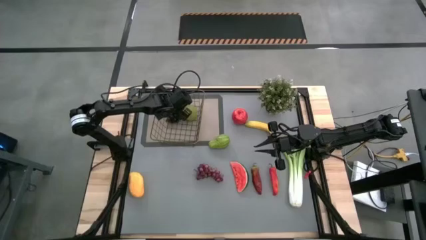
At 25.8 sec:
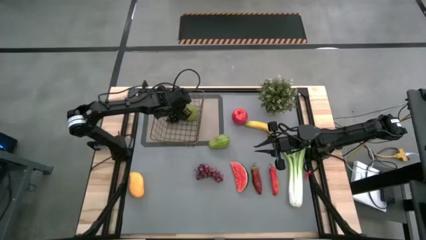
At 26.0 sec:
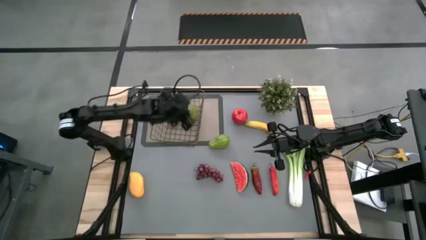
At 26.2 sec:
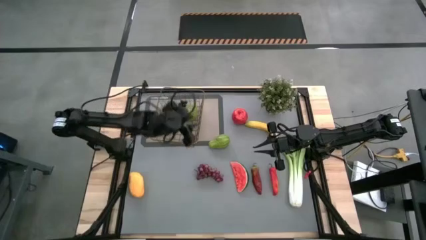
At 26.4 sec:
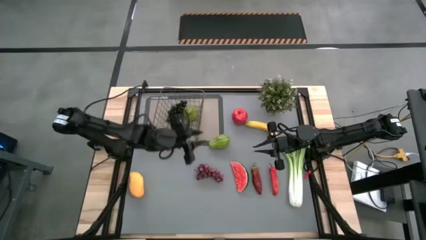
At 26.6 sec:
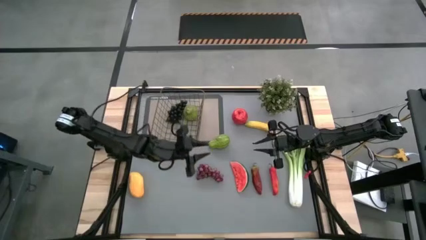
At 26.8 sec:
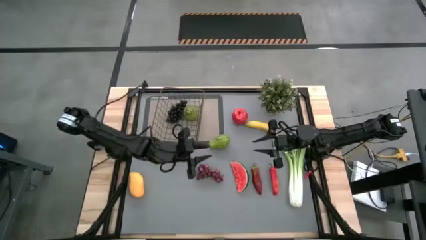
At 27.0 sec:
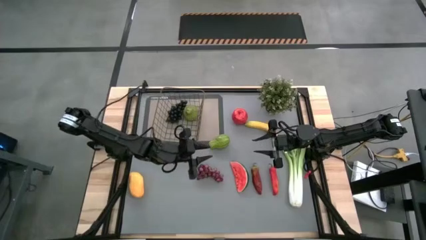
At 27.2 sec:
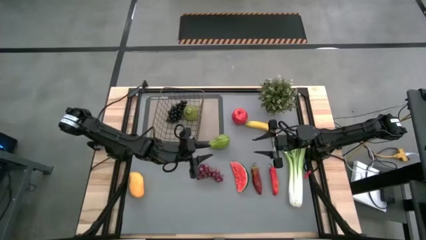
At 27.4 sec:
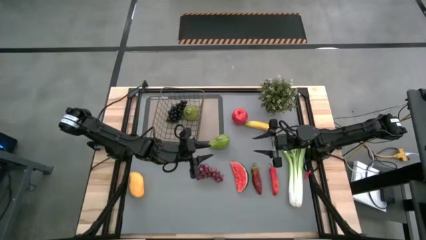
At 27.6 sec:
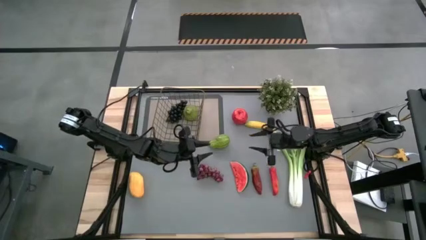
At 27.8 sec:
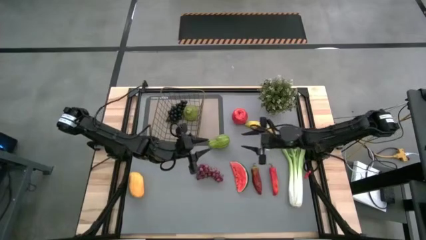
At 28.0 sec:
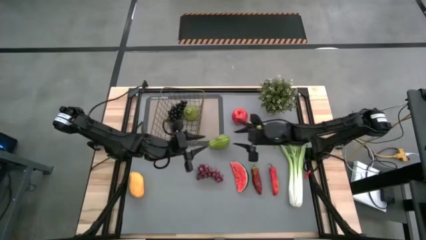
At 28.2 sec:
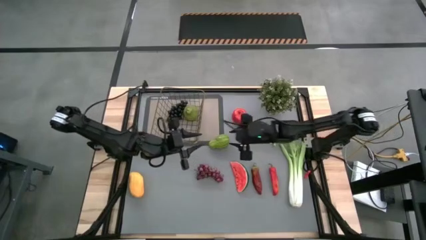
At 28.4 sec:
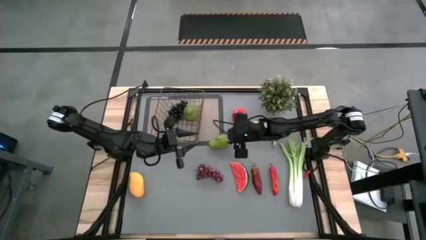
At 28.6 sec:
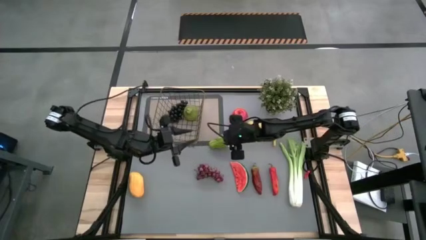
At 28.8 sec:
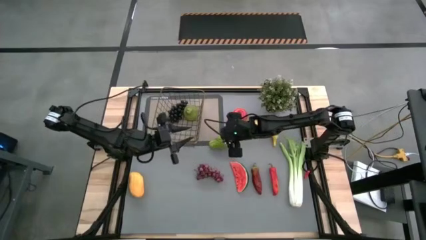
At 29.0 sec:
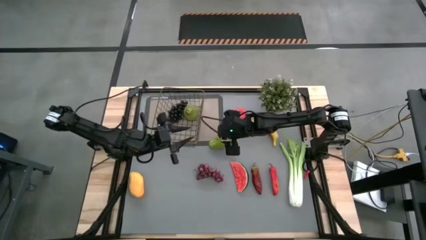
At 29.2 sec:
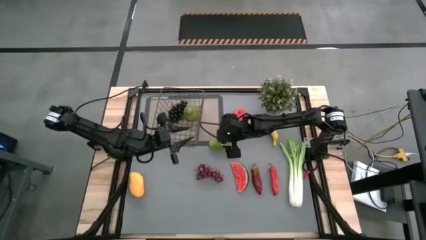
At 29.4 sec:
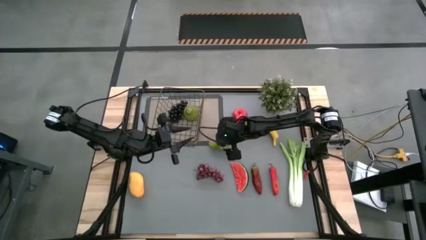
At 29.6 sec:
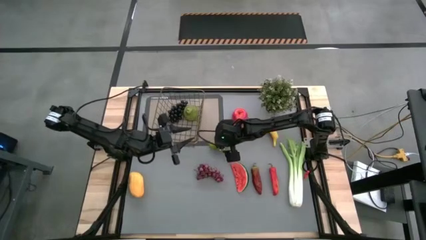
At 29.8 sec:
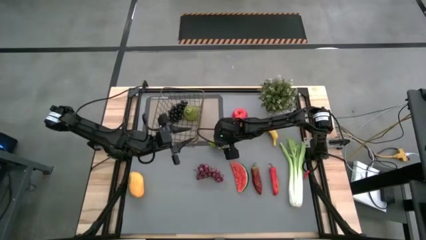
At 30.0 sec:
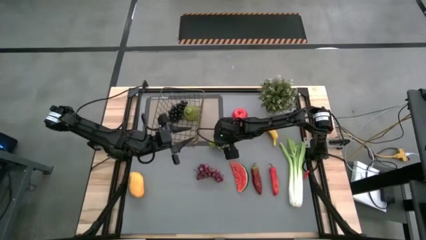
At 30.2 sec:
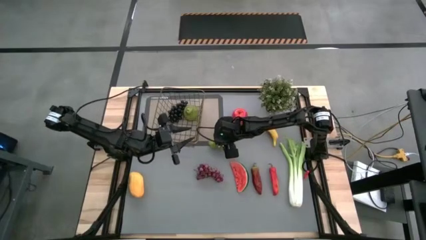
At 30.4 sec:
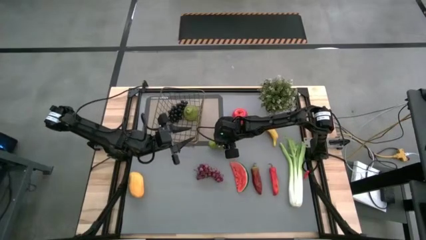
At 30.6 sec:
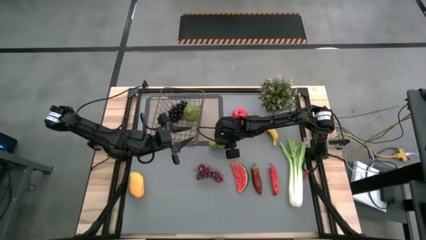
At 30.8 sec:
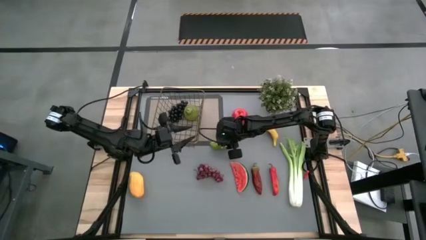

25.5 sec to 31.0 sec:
Task: Build produce basket
Put the chayote into the wire basket

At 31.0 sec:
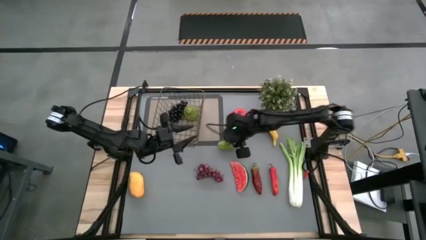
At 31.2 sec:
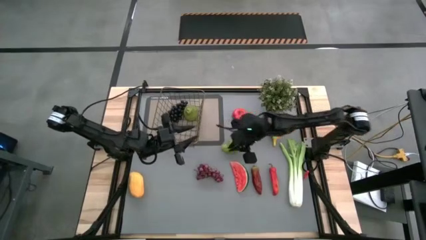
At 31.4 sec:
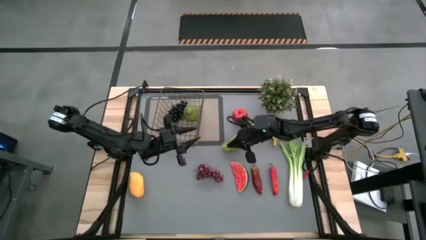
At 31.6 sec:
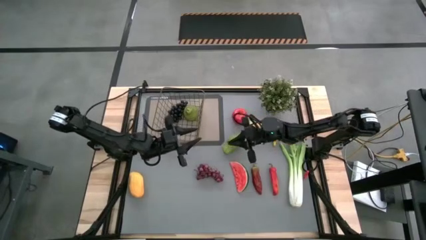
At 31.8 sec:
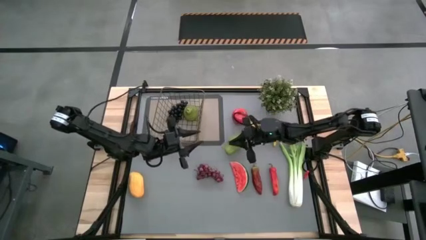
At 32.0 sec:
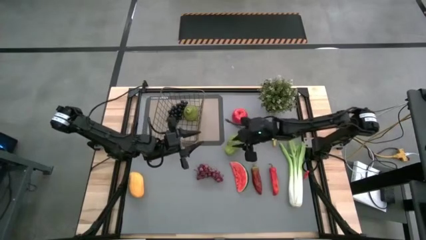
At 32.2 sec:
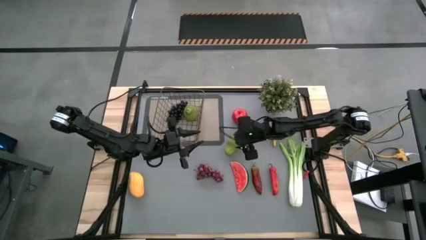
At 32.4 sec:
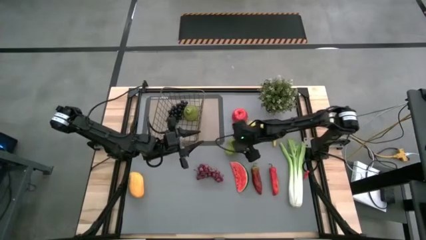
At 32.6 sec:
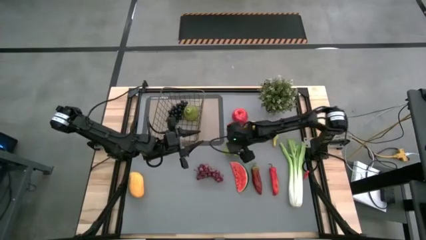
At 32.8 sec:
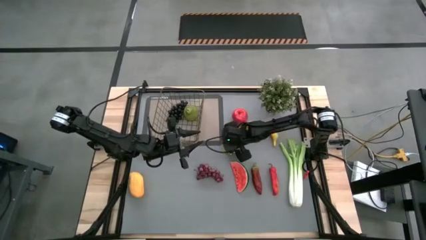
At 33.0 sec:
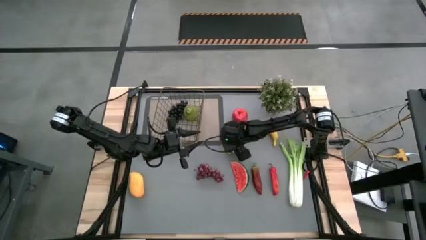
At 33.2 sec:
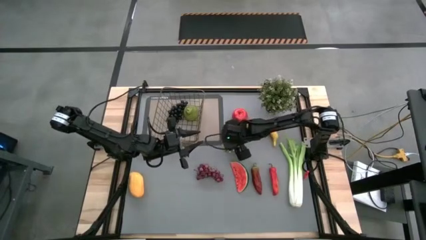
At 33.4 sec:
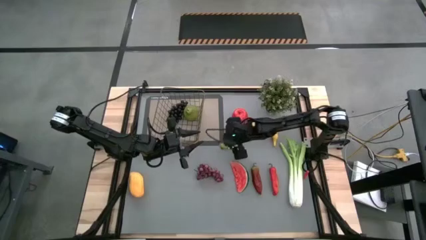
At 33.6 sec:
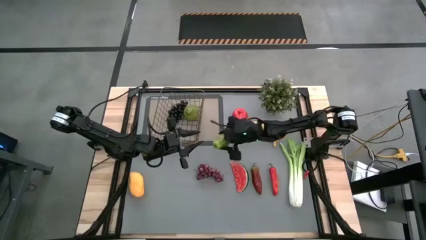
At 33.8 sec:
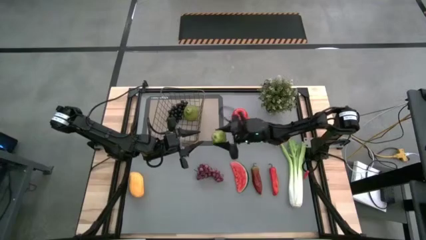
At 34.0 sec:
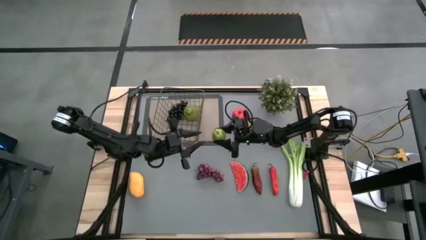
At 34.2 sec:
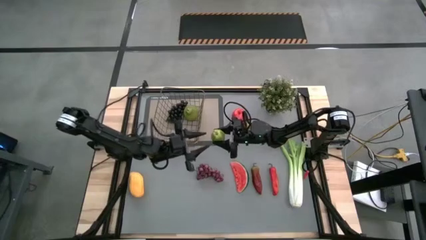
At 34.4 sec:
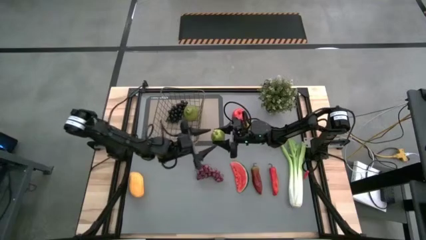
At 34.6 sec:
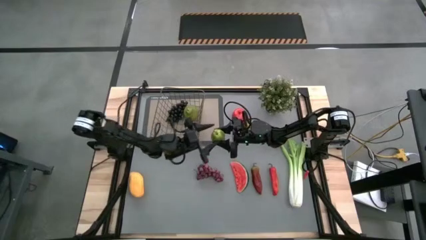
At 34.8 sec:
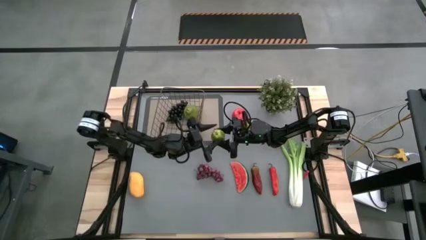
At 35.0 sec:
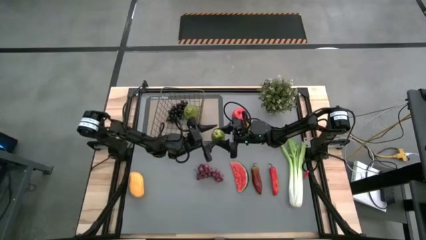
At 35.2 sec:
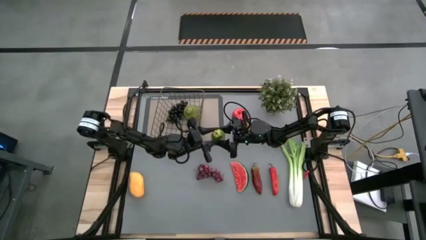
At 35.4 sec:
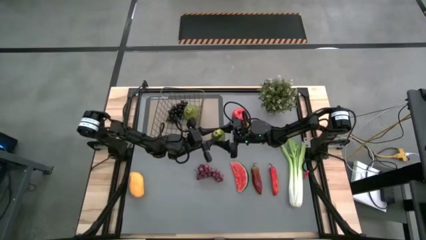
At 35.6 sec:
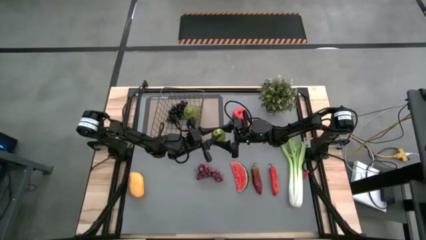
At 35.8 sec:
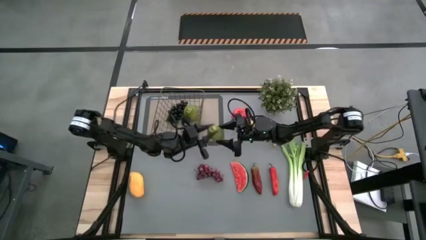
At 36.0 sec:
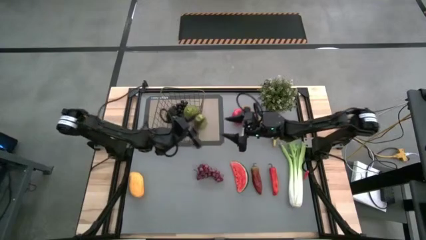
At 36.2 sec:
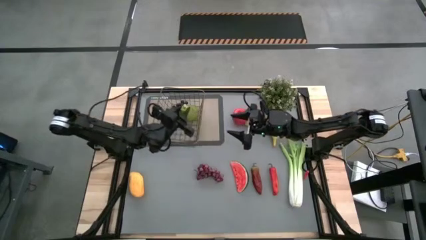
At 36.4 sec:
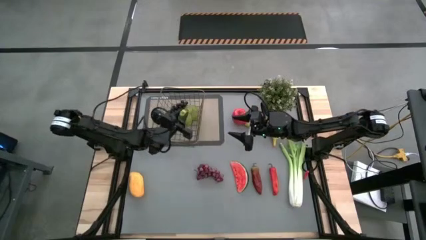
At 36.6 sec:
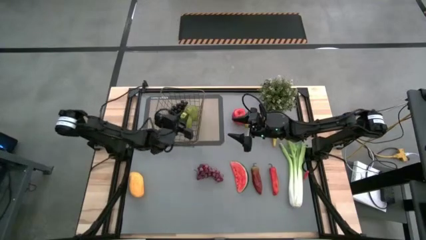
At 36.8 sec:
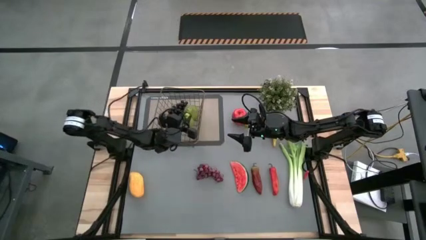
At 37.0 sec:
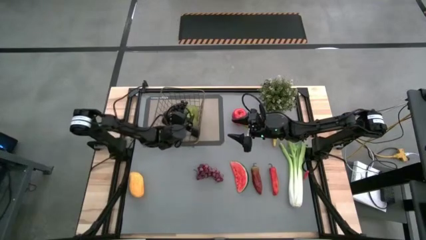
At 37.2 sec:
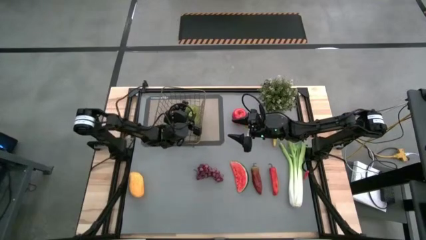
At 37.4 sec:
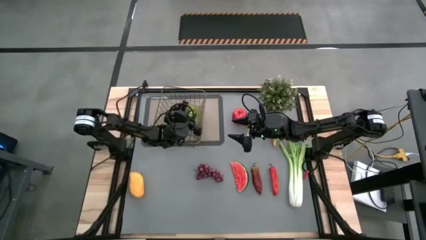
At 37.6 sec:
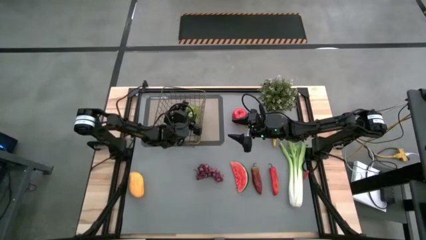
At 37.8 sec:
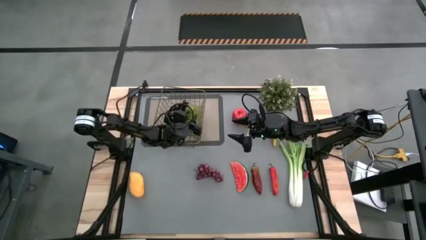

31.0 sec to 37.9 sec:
Put the chayote into the wire basket

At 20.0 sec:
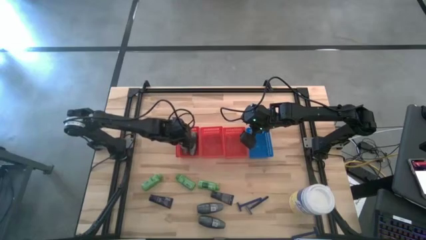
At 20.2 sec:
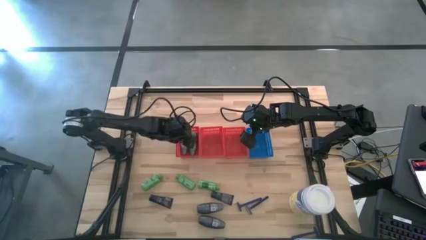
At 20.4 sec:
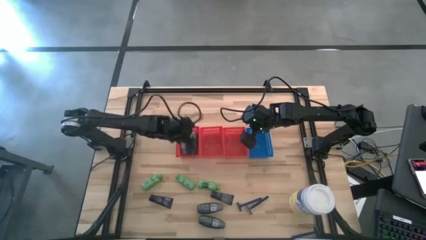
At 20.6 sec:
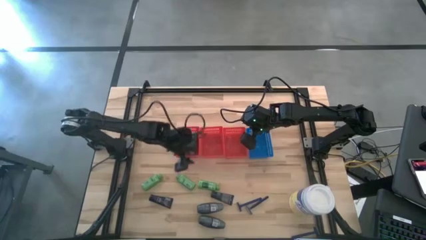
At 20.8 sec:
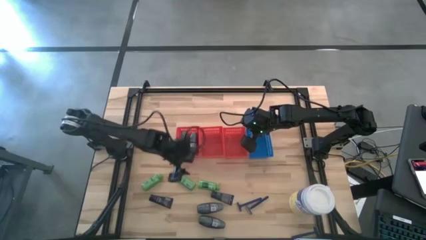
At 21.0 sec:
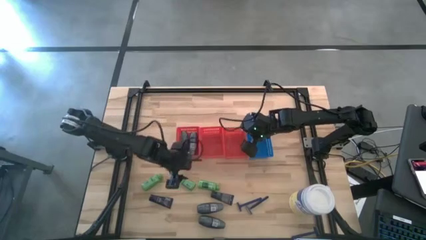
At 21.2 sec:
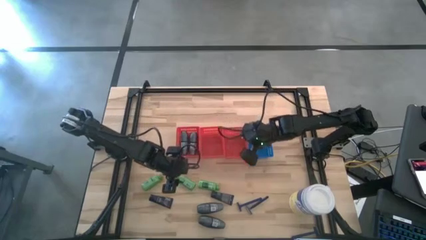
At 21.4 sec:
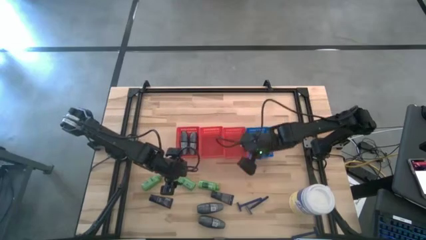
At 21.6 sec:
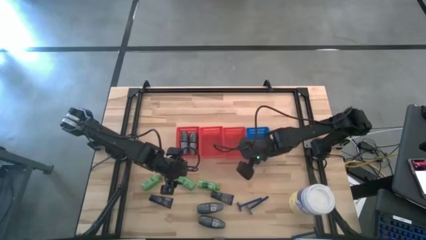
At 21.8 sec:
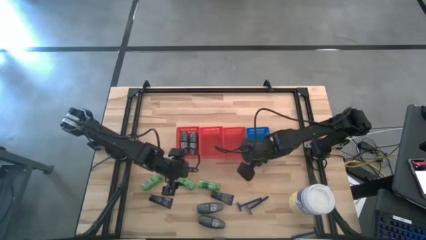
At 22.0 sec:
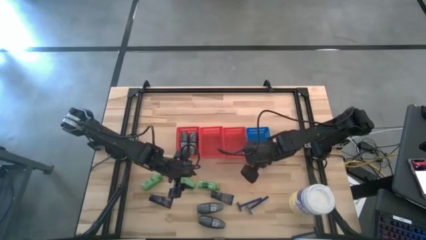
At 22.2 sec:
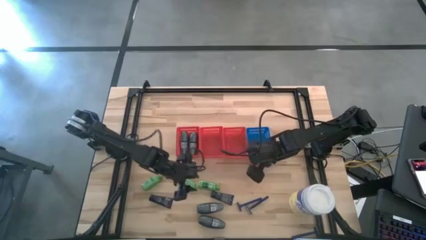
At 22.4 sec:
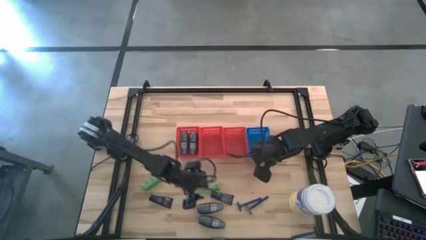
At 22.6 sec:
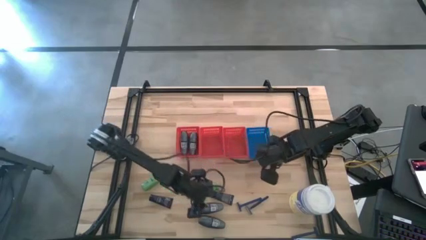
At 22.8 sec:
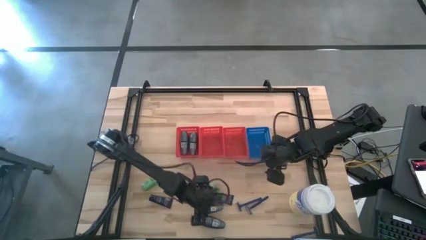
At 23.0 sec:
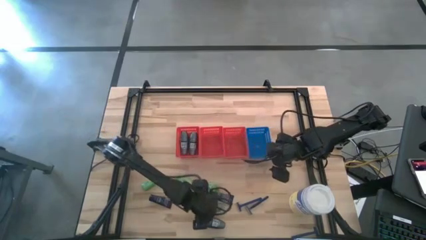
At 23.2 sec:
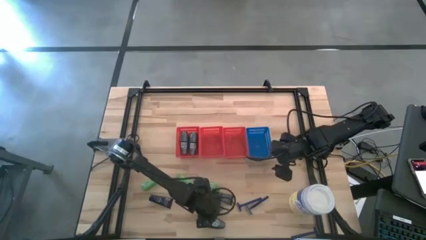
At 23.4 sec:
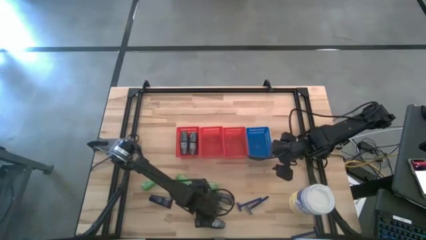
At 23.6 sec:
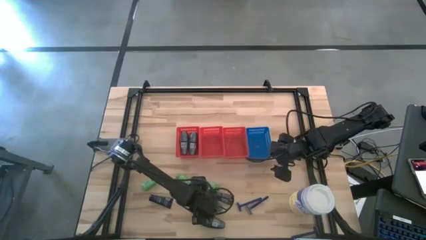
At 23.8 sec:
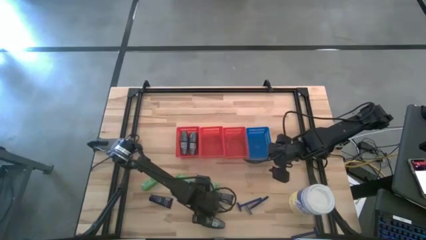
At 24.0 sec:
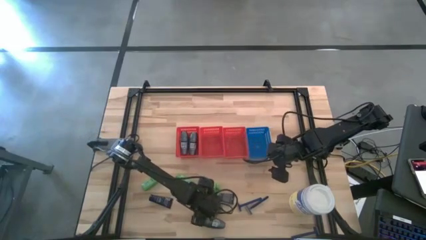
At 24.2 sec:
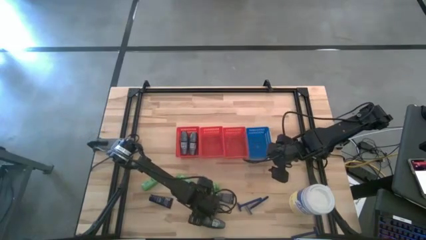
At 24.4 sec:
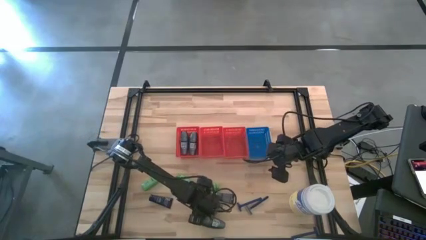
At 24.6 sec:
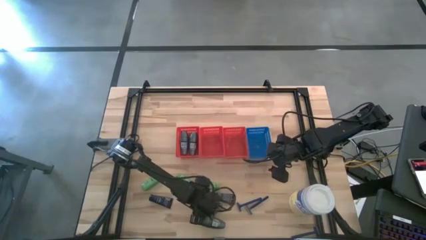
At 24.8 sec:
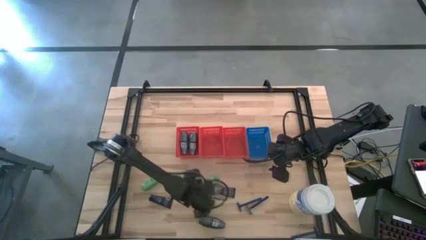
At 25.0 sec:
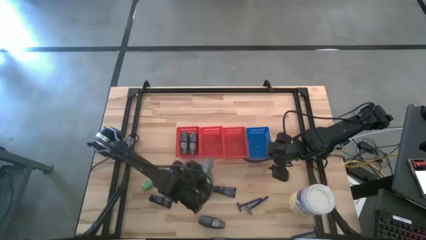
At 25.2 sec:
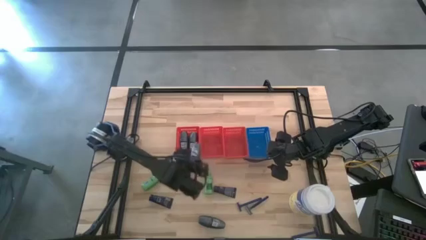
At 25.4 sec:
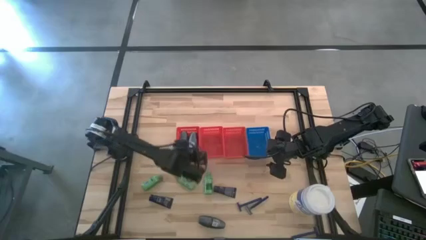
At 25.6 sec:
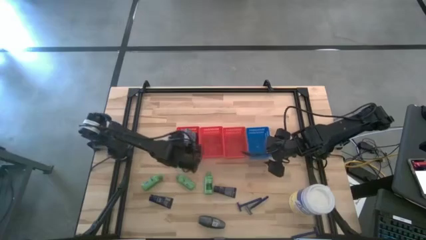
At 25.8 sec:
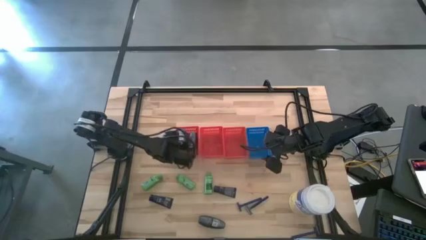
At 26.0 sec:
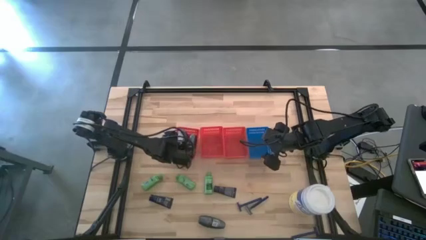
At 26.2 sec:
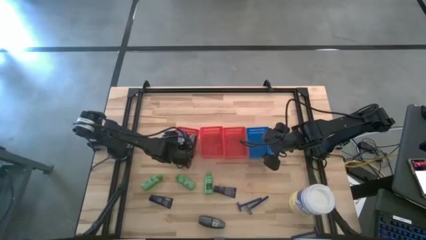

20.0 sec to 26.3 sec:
Task: Pick & Place Travel size toiletries
Put the black deodorant into the left red bin
